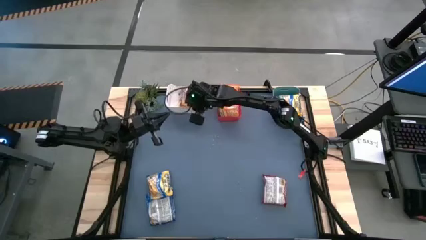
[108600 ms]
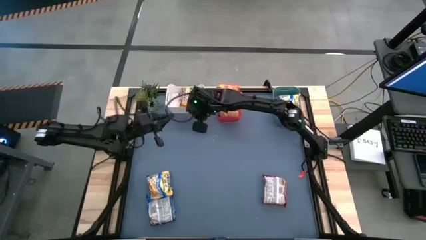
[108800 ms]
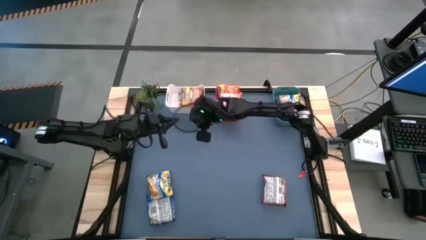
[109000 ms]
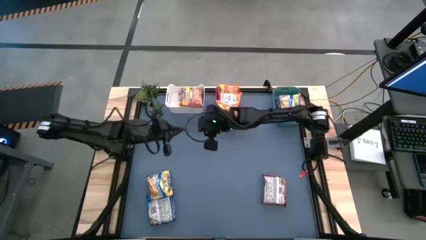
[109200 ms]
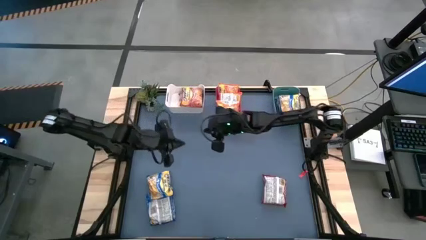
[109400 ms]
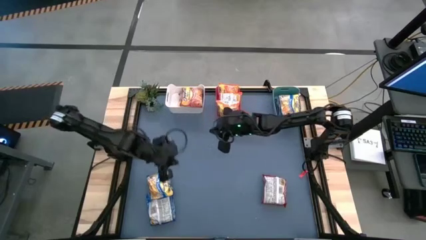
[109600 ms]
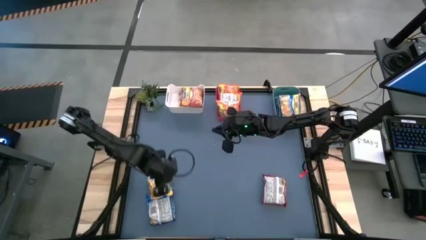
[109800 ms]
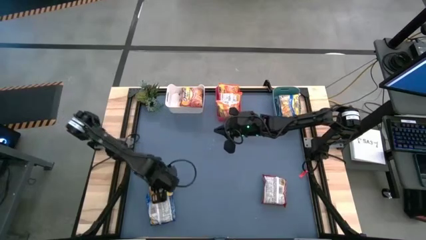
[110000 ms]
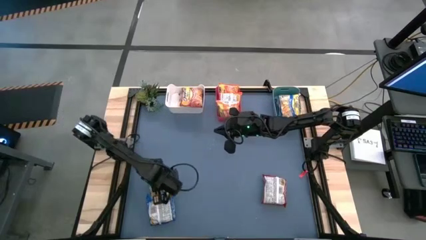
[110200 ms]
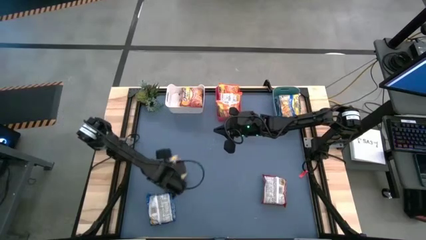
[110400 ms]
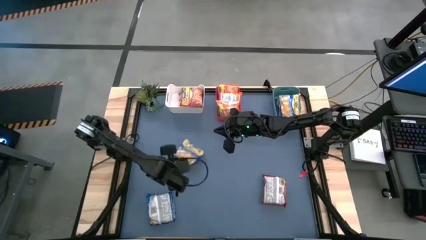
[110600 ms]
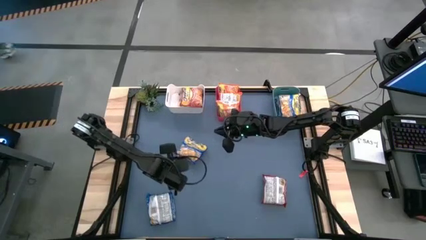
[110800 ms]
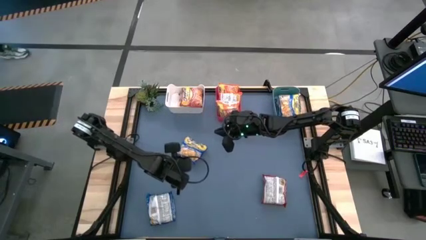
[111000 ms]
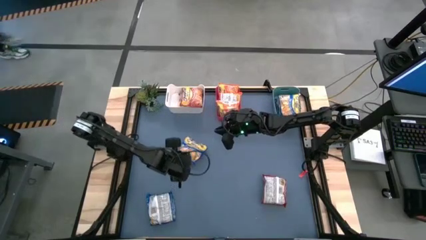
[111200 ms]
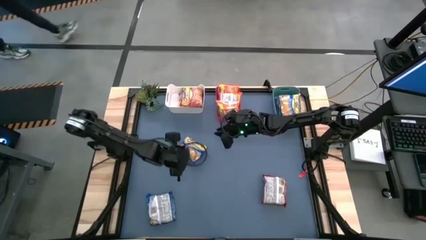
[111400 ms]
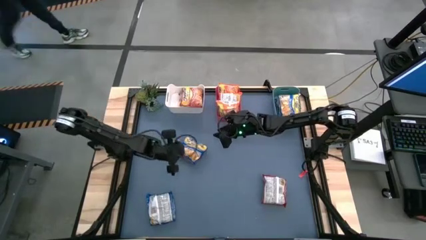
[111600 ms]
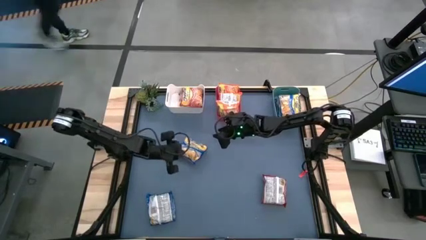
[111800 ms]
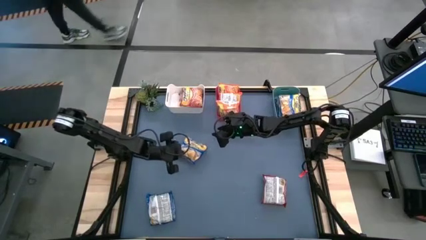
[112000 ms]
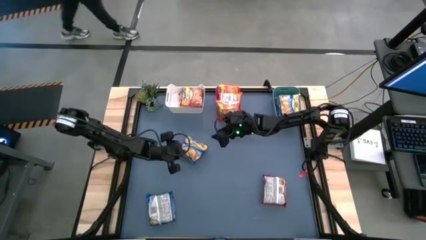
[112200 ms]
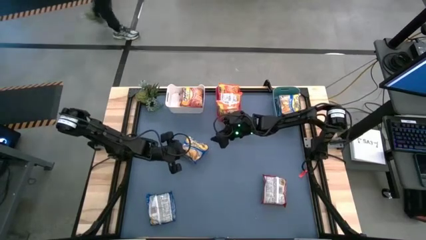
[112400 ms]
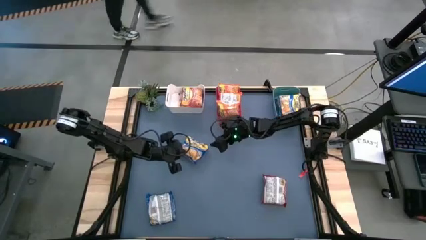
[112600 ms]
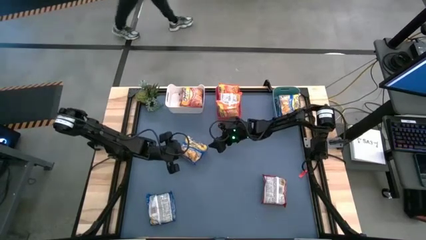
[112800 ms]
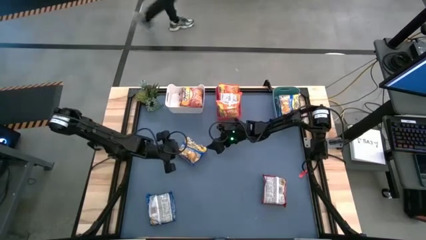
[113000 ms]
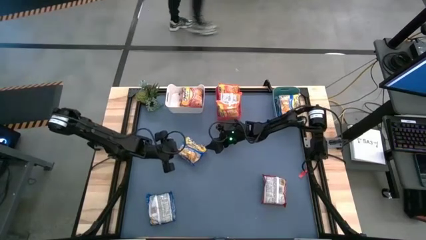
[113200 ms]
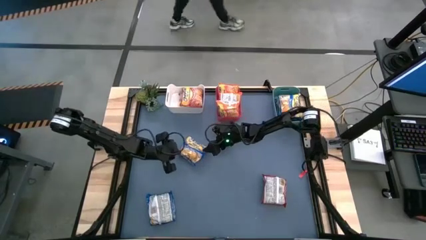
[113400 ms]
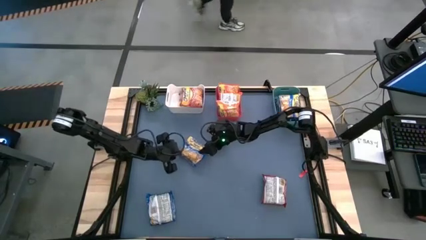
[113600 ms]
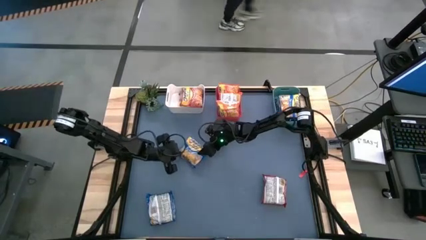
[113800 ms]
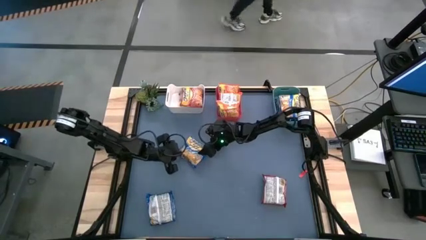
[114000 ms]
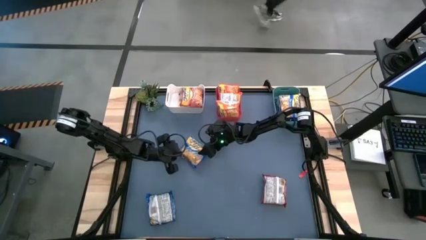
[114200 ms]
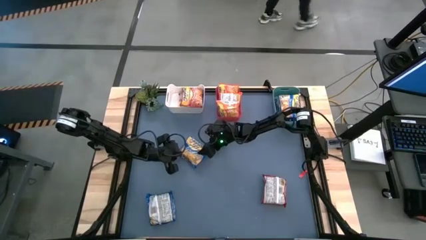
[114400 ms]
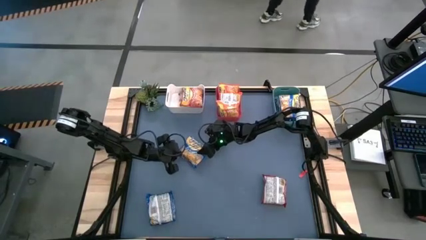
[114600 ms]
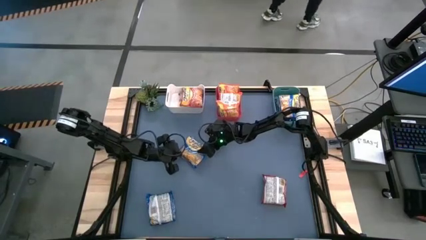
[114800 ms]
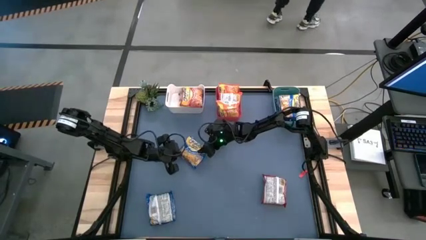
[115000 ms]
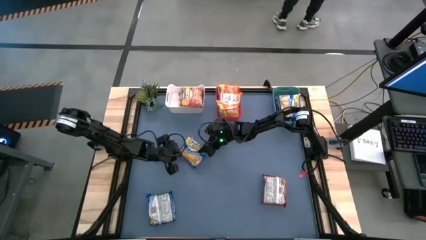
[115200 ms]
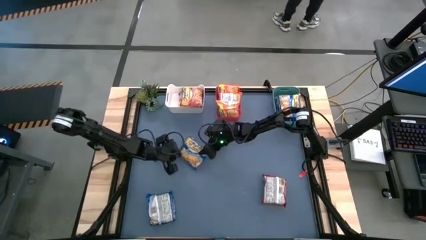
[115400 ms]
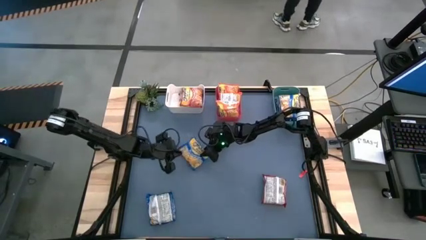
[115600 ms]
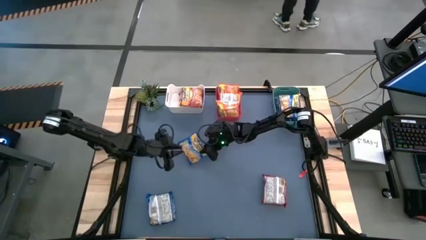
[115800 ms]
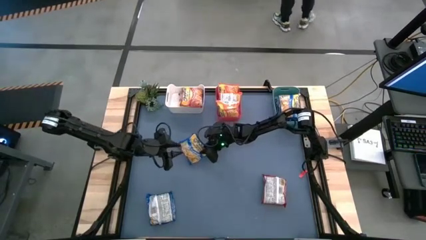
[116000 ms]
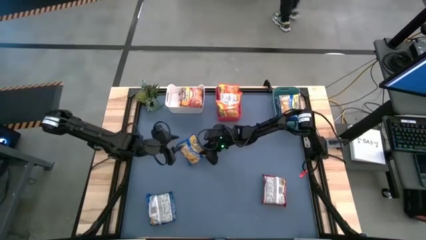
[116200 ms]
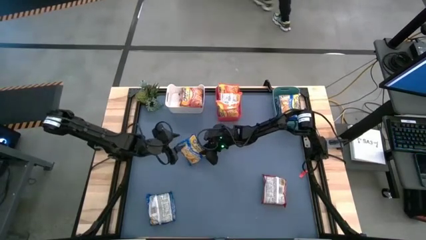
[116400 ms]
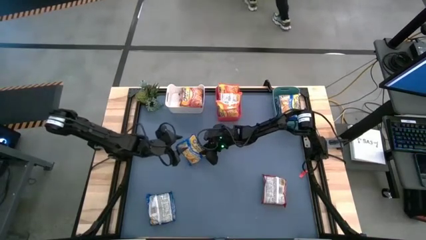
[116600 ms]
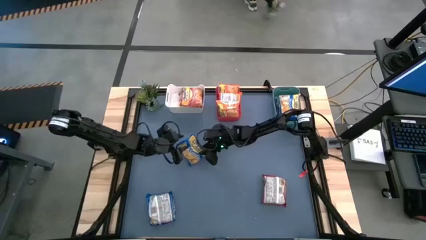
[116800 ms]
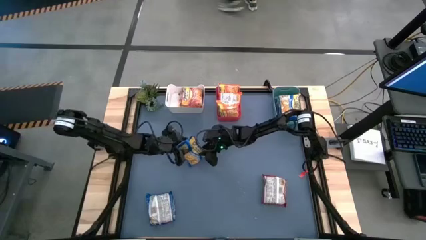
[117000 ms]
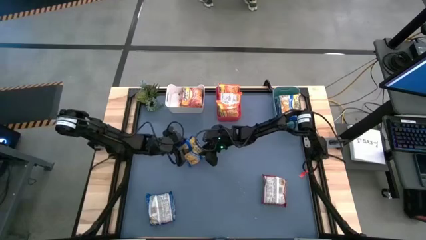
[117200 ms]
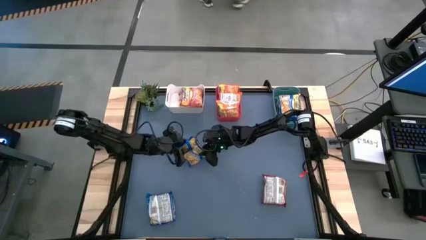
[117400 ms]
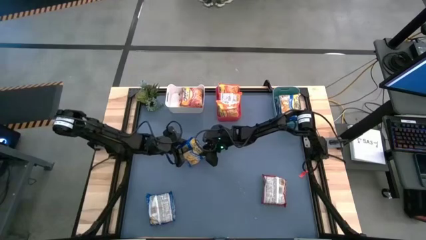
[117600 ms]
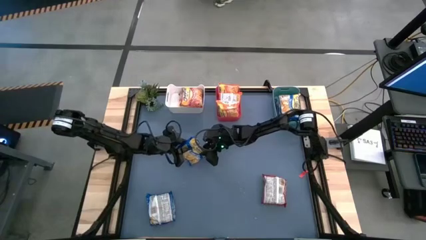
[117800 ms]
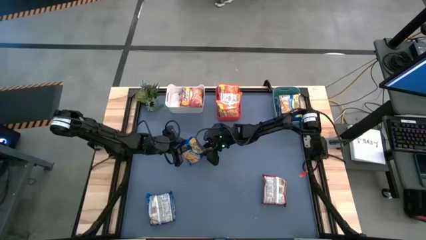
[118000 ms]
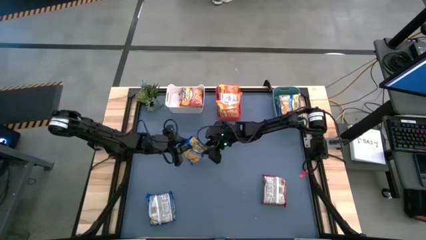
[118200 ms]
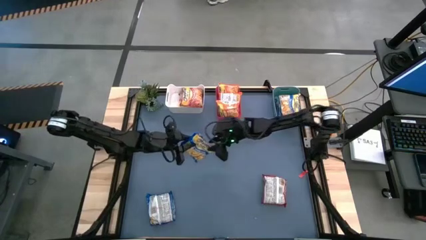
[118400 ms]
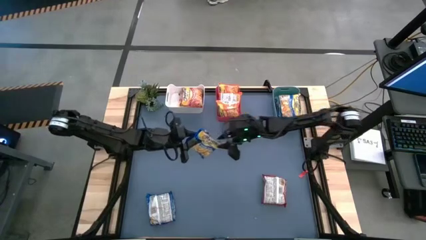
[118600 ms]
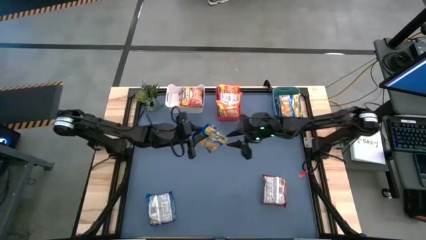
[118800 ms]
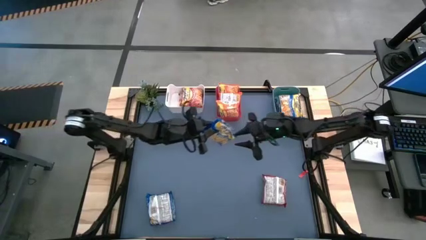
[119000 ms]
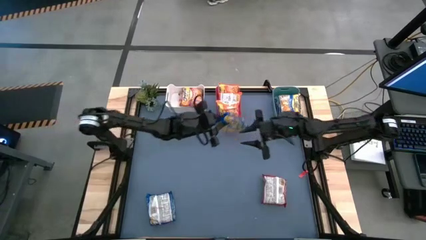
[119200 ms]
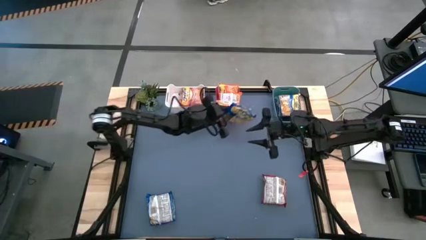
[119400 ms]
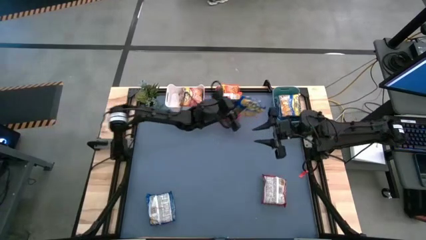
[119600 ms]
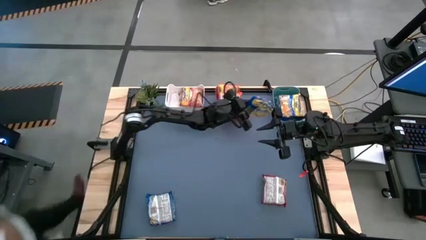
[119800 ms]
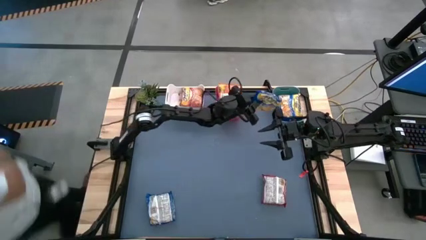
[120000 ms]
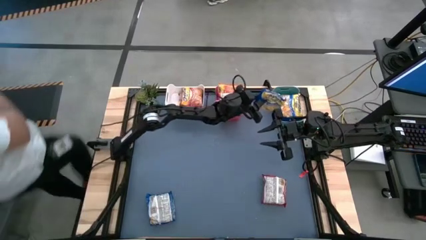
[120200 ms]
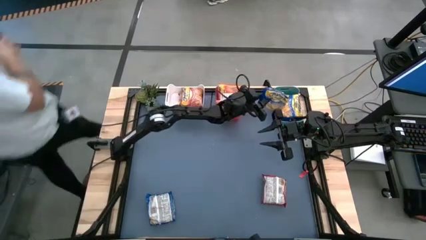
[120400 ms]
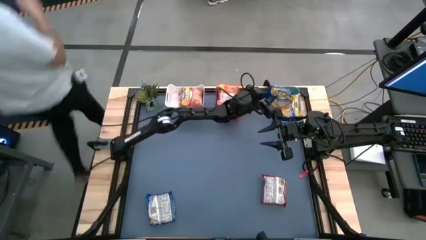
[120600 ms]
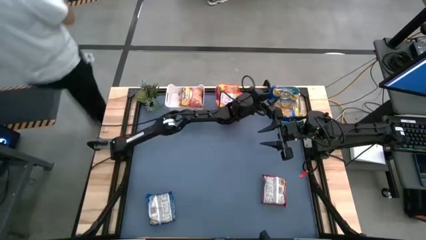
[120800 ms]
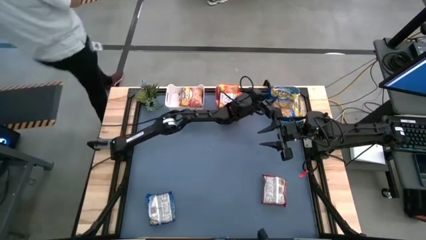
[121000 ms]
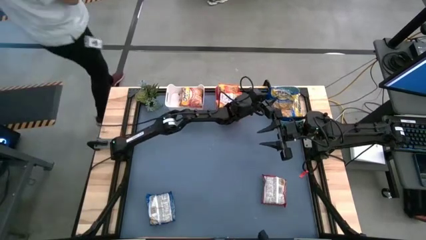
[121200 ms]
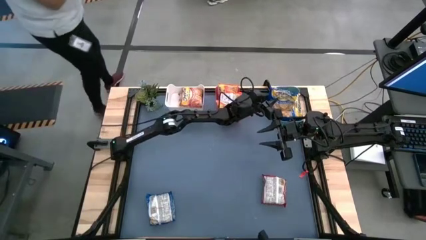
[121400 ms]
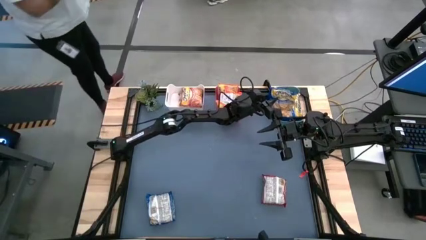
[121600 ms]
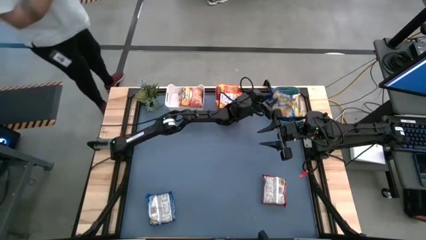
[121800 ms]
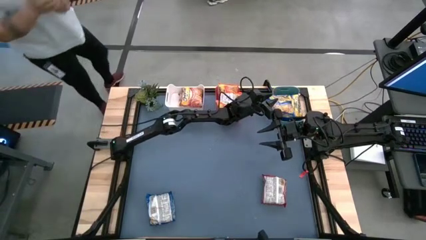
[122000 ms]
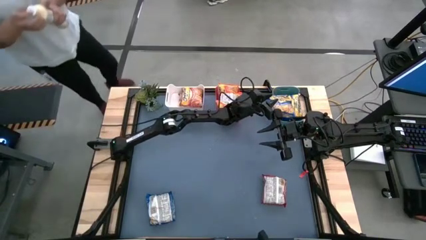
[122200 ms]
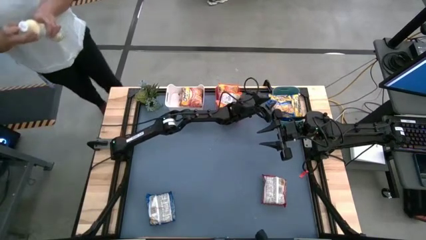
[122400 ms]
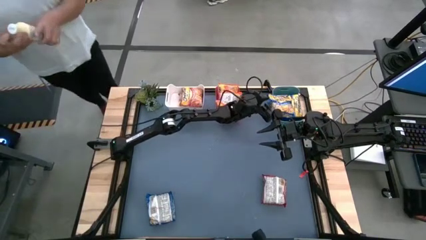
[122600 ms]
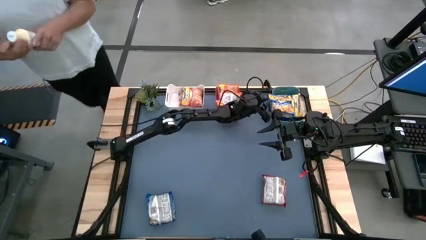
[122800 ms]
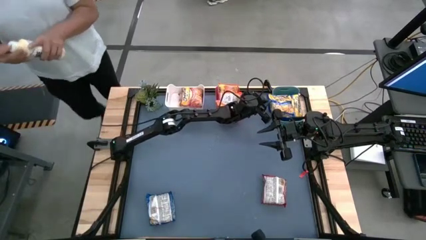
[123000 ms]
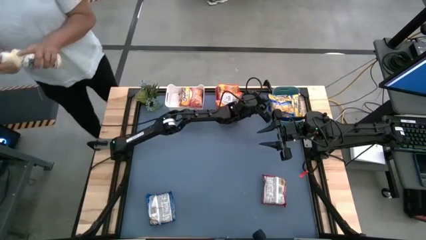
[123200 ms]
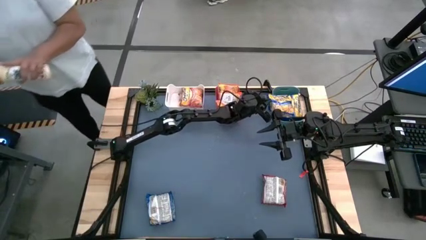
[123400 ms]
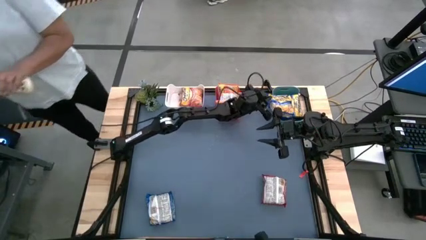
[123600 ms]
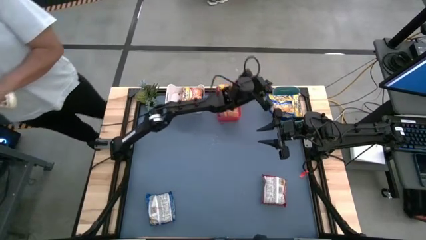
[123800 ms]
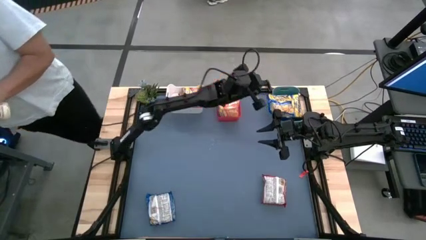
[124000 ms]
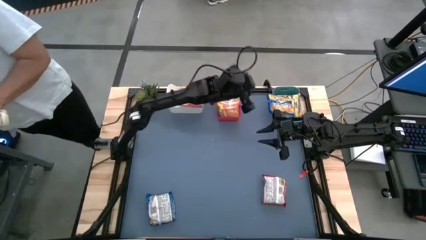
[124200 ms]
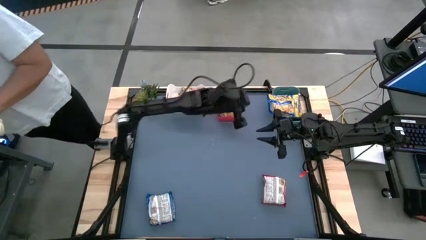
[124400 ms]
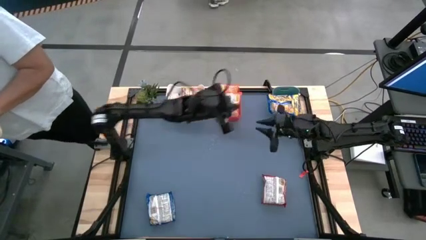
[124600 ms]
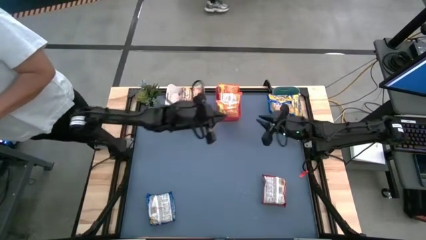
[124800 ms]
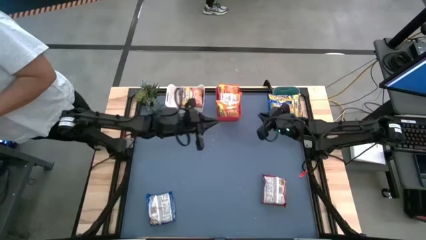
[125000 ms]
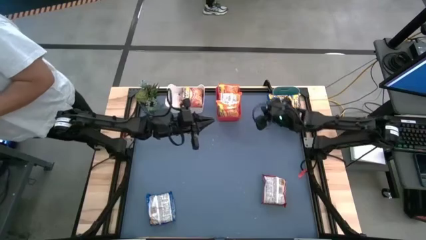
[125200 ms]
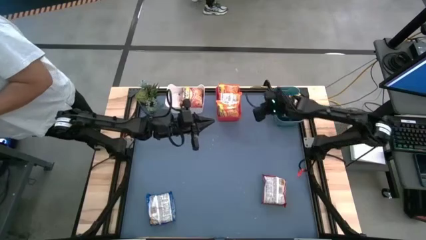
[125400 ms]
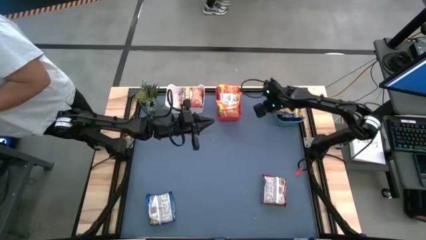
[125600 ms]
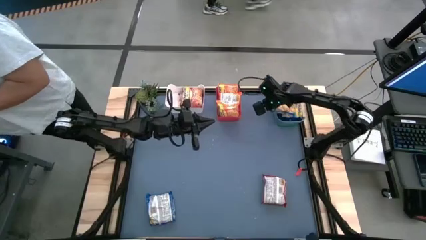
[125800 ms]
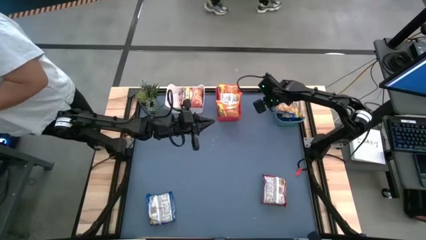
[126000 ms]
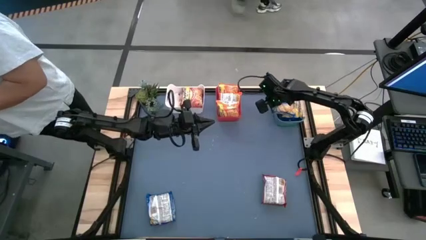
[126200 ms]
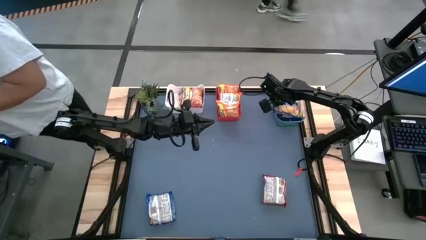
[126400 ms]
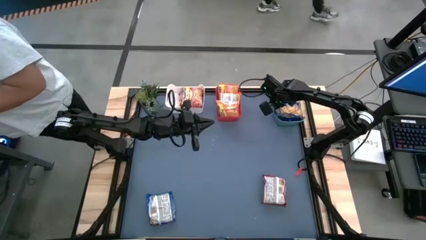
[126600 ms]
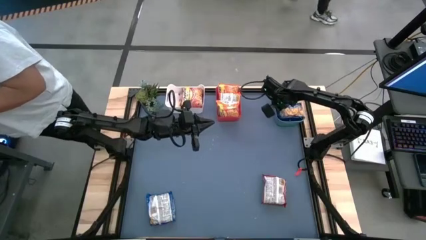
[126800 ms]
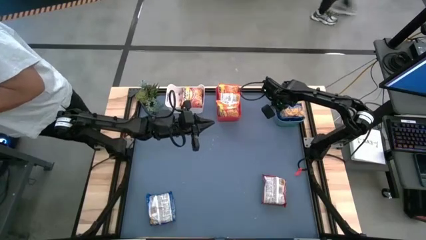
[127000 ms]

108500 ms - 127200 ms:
Task: Sort Maruchan noodles
Put the top blue noodle pack into the green bin
